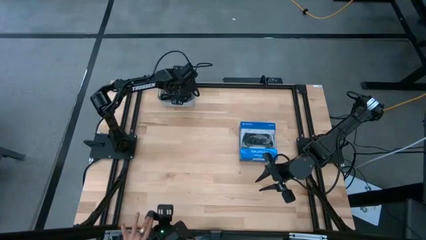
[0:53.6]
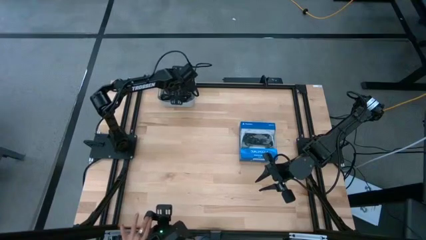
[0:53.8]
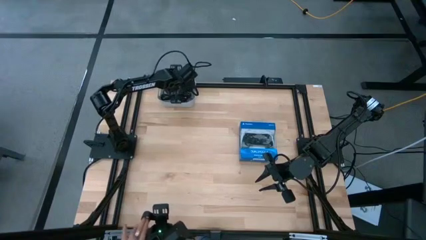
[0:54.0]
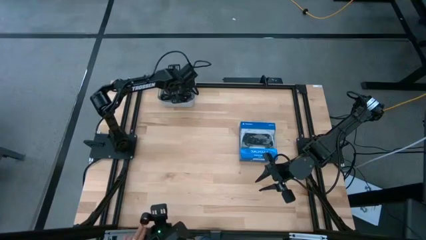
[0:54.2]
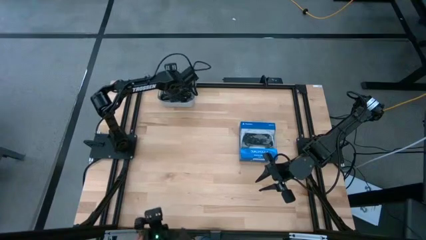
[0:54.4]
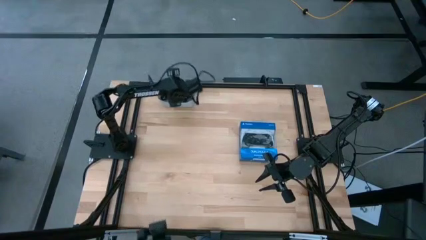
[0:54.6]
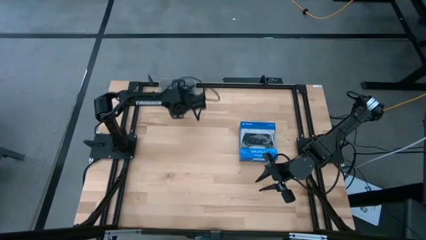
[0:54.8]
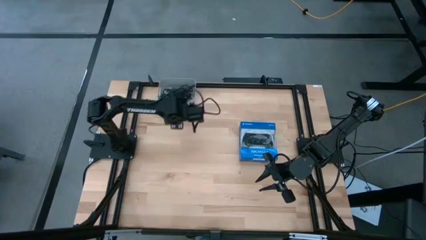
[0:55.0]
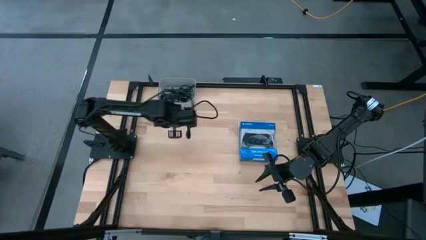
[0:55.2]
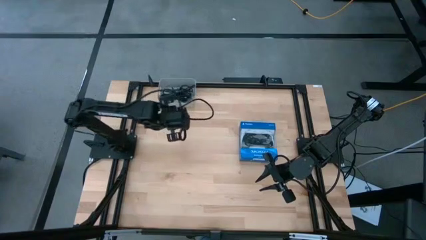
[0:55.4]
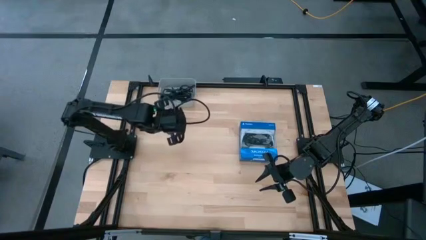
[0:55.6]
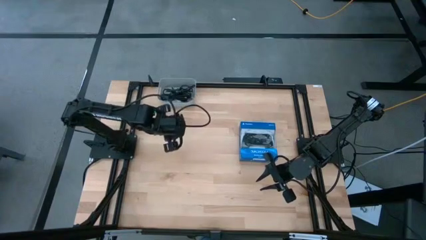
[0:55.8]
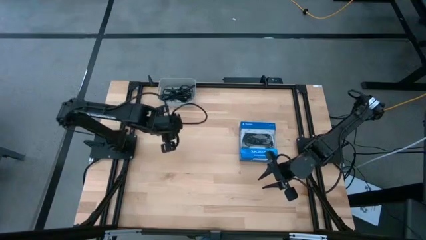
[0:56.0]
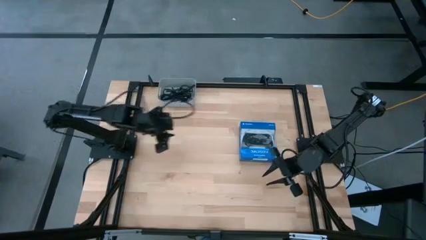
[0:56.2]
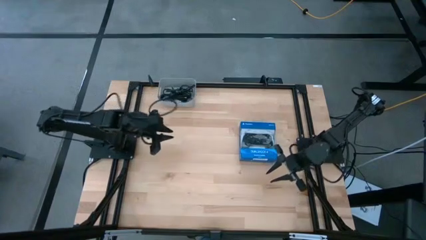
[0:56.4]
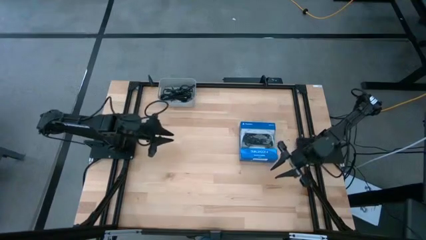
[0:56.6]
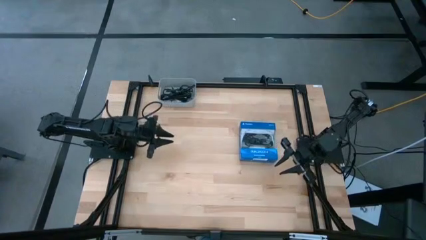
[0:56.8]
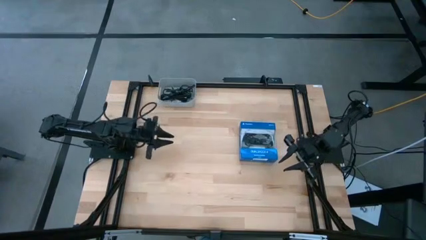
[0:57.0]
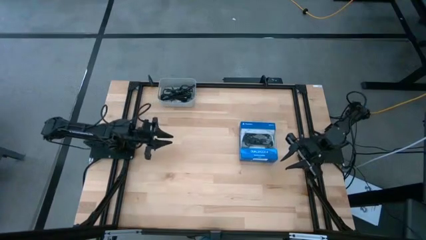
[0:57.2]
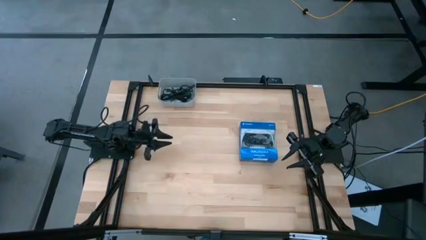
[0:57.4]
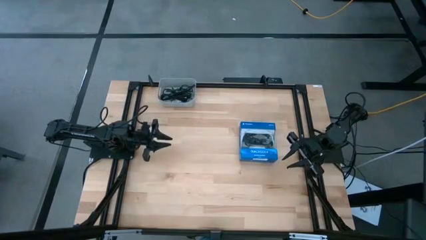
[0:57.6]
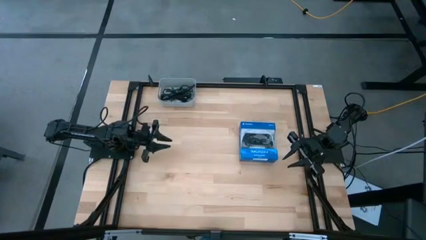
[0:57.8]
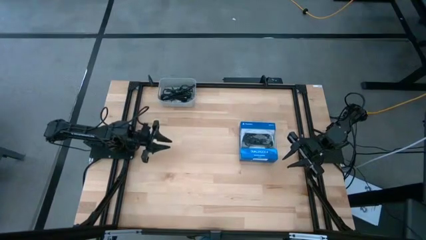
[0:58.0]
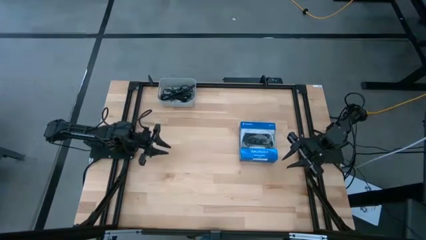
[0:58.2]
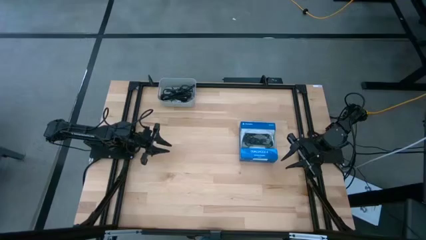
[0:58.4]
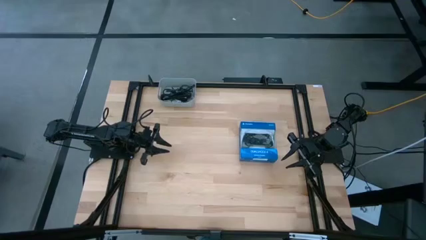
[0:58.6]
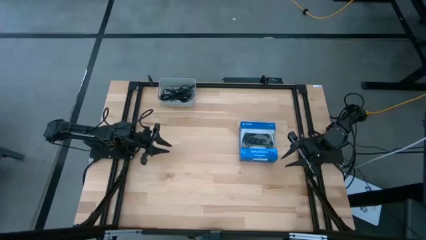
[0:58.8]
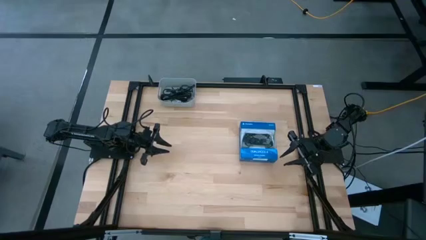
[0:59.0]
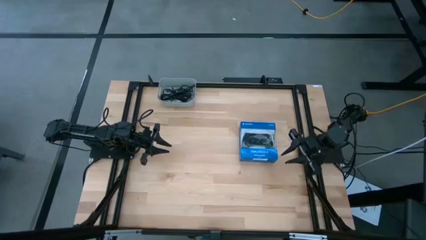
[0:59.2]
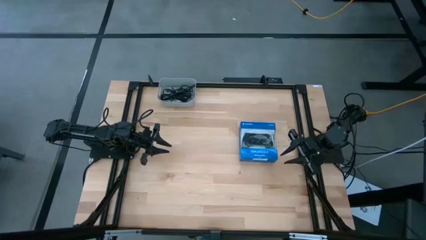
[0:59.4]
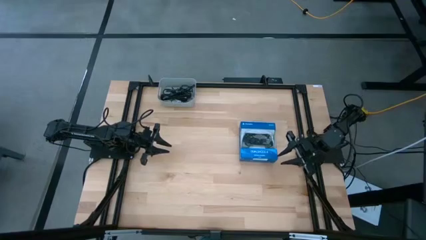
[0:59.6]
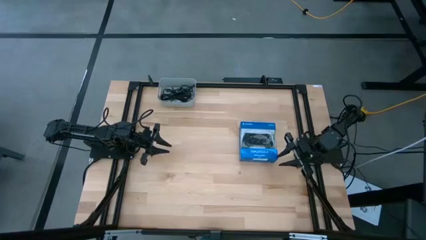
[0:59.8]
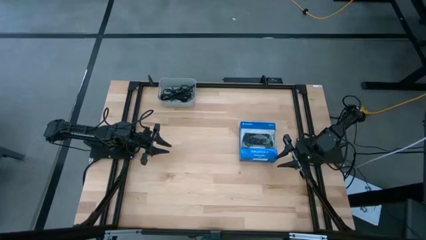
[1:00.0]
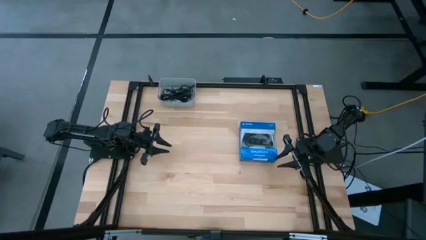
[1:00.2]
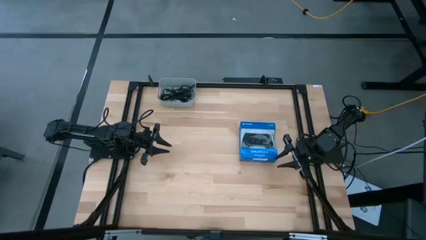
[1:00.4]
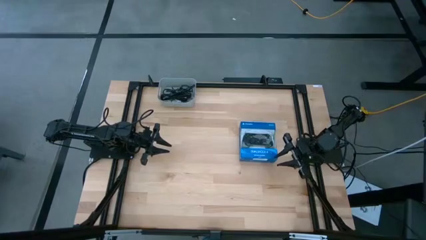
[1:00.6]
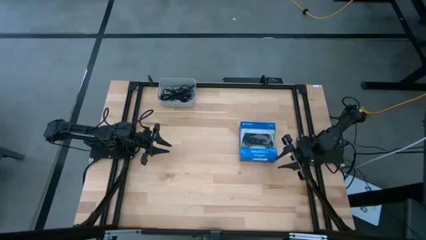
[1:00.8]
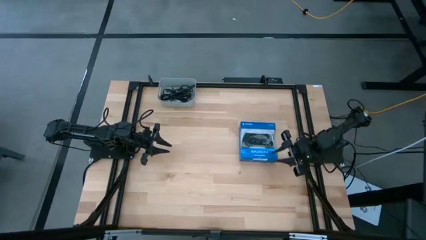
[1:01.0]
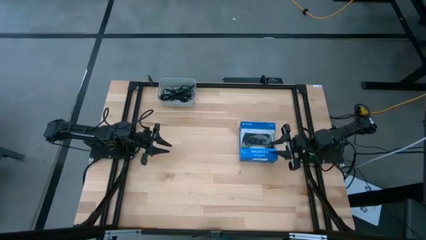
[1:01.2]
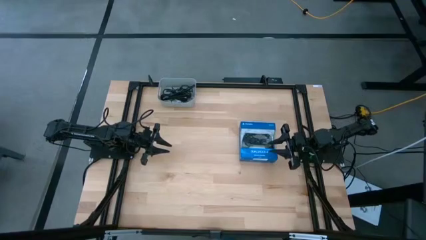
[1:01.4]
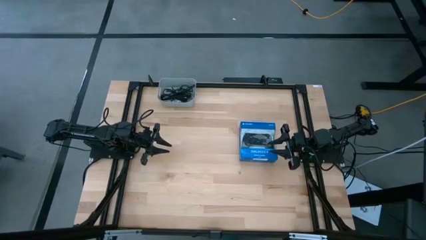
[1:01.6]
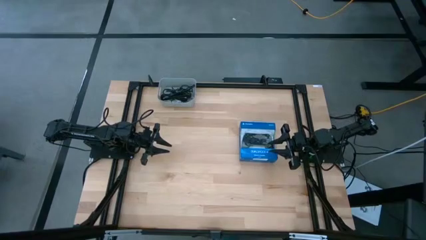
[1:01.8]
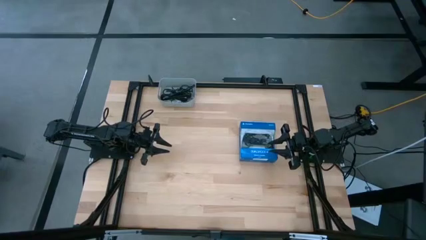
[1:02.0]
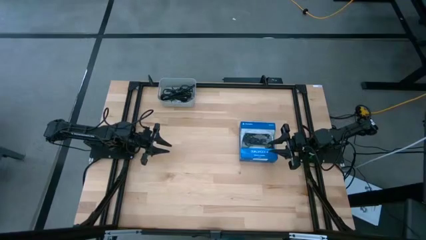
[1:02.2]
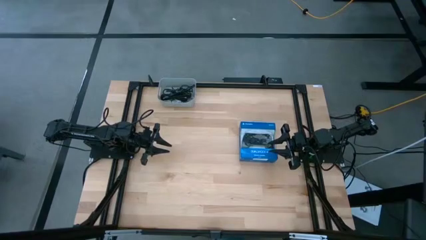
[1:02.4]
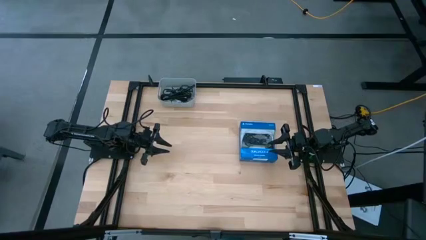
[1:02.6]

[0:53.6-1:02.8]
Task: Pick and place USB-C Cables
Return to Home Position
